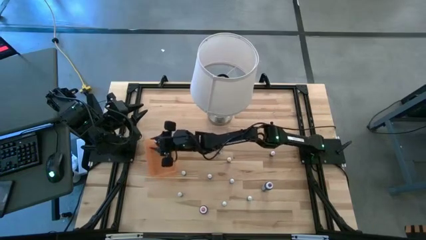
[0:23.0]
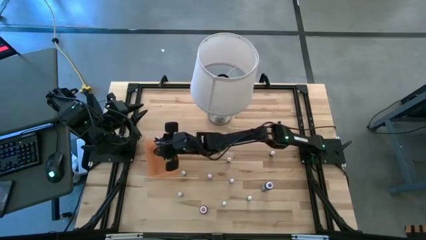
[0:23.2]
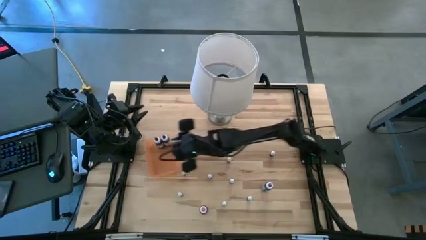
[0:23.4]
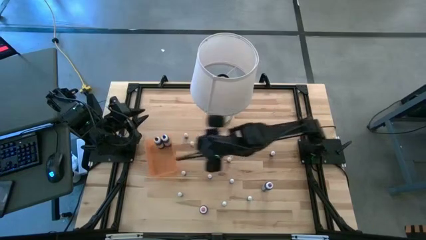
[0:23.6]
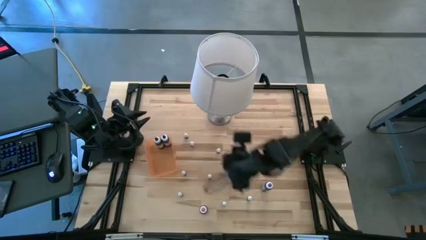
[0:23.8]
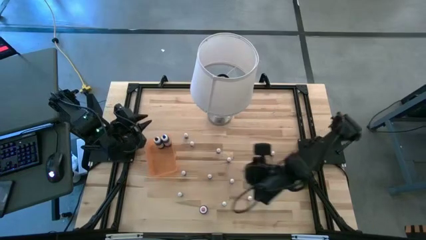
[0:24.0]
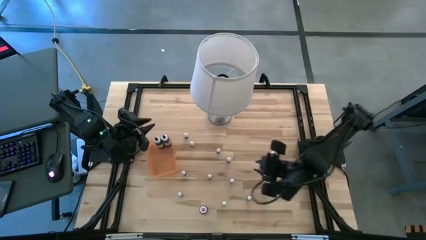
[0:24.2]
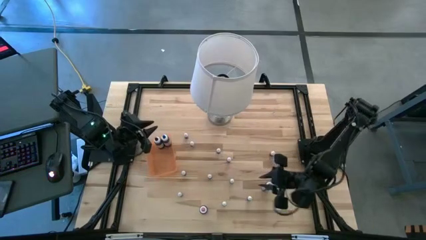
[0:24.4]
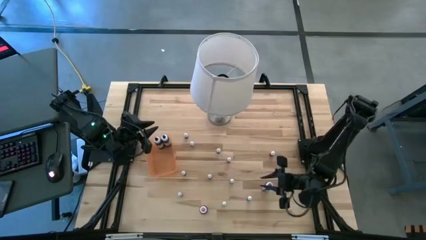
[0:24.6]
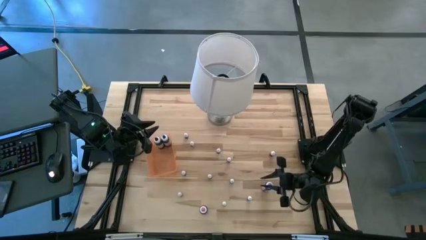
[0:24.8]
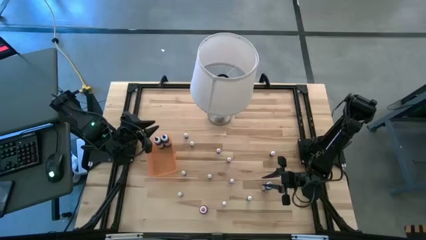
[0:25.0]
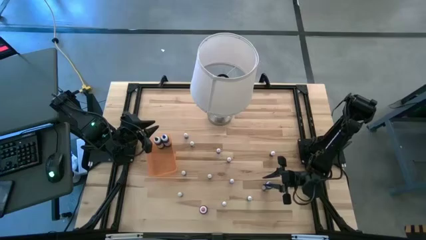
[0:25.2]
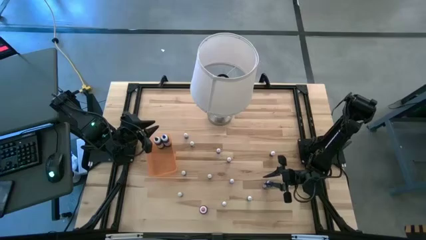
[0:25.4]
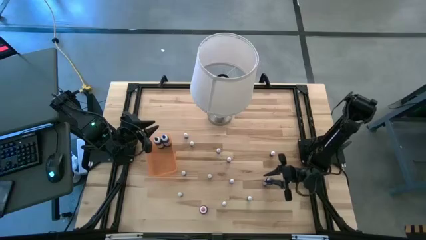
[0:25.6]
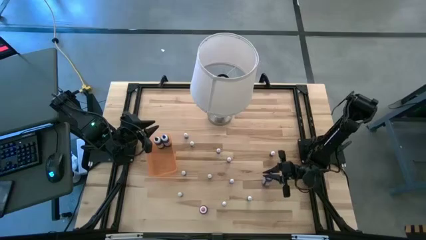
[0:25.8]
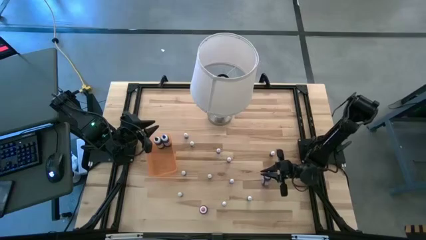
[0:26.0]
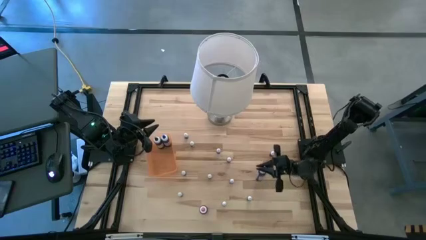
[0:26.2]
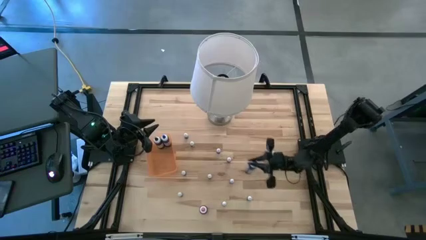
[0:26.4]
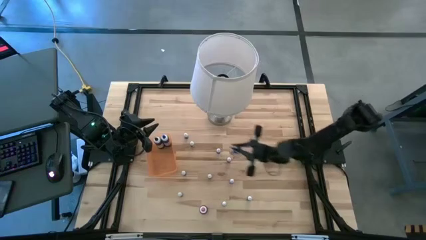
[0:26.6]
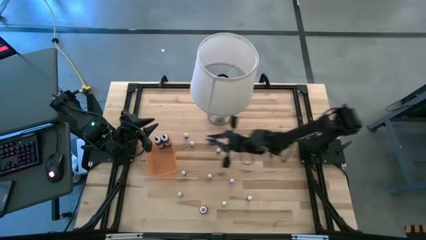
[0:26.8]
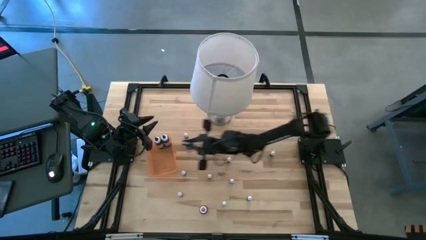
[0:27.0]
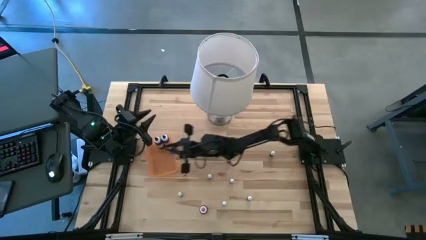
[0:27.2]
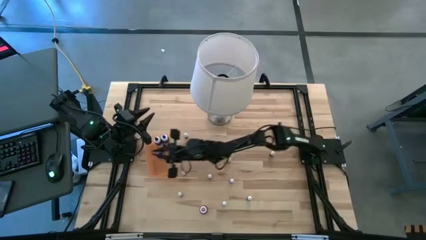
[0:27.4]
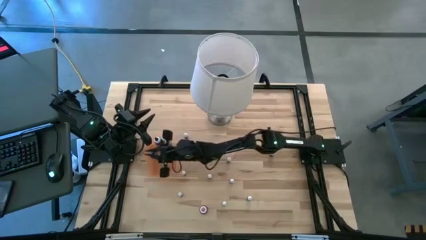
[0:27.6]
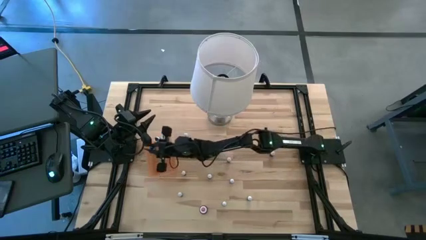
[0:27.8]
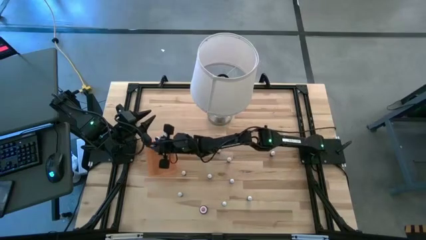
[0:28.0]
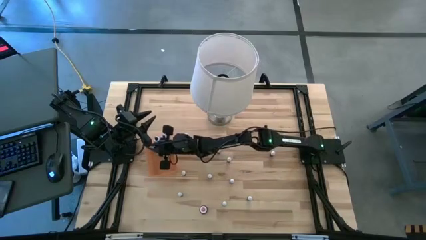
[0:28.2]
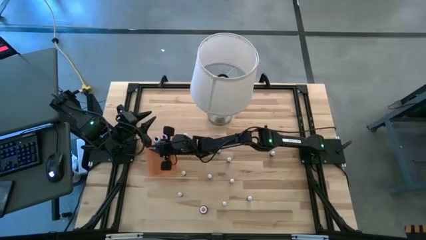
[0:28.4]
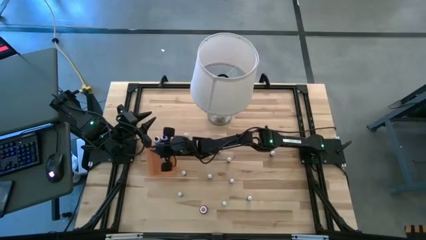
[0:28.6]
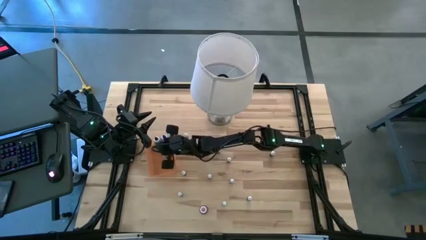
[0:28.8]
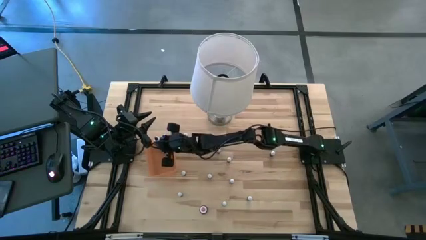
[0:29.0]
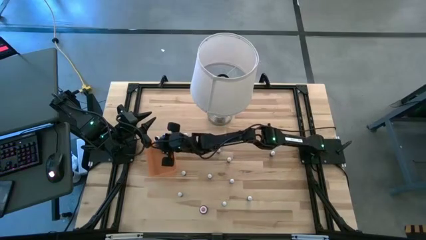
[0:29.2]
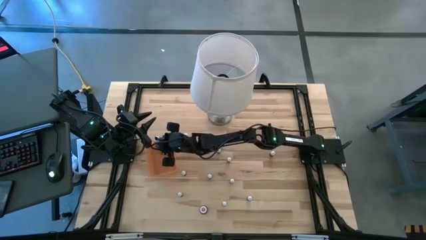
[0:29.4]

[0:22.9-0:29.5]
Task: Pick & Place food coloring
Put the big purple food coloring bottle into the orange bin

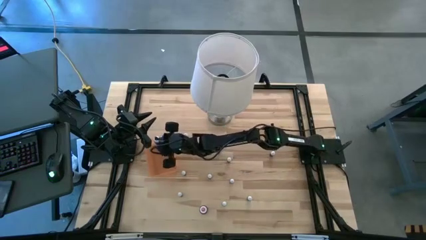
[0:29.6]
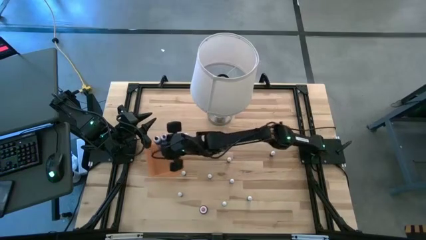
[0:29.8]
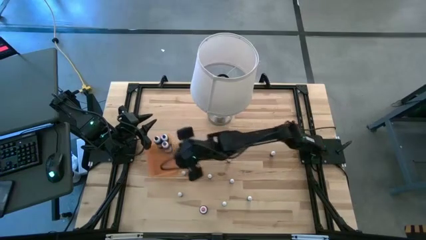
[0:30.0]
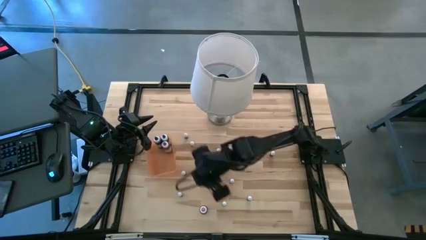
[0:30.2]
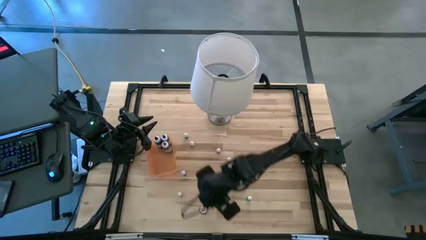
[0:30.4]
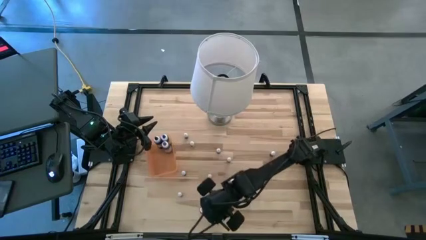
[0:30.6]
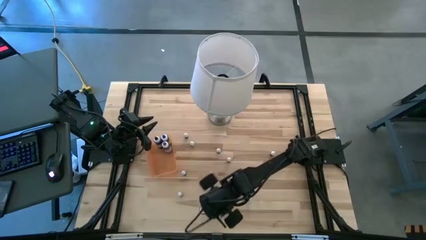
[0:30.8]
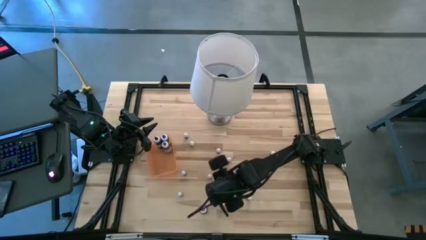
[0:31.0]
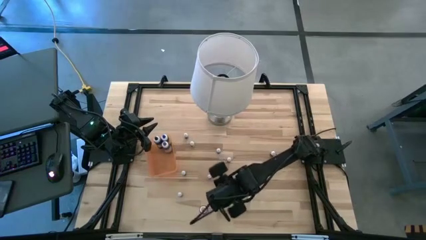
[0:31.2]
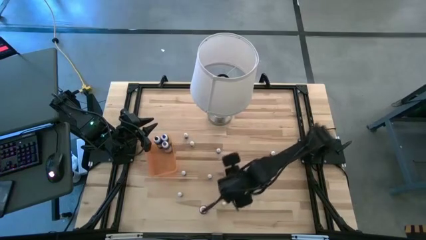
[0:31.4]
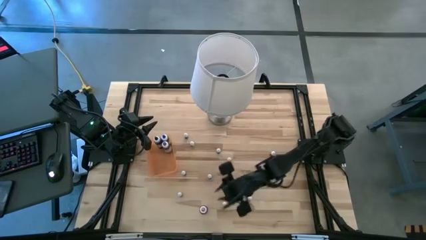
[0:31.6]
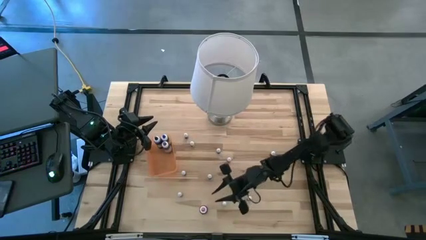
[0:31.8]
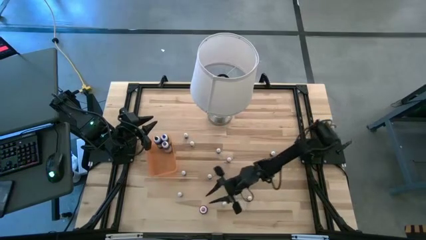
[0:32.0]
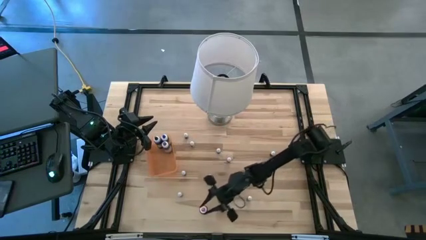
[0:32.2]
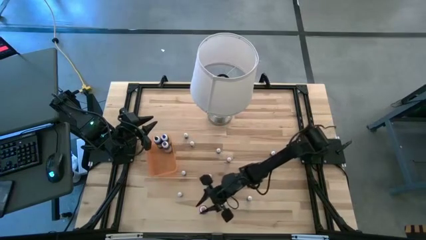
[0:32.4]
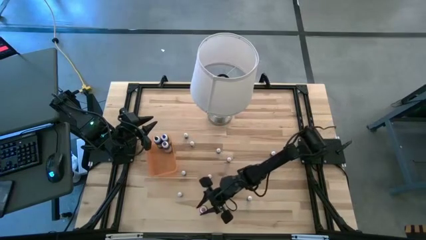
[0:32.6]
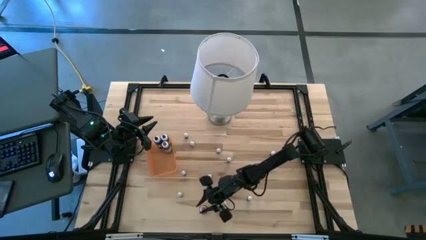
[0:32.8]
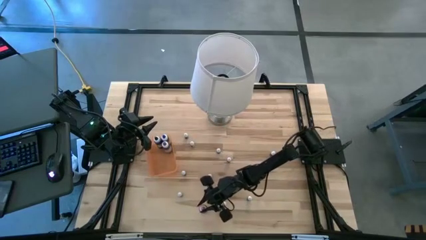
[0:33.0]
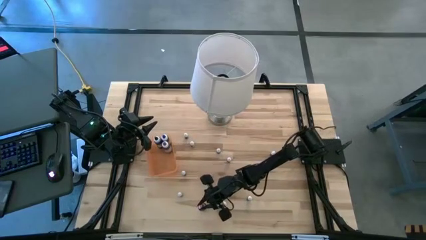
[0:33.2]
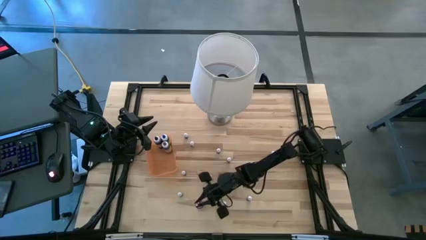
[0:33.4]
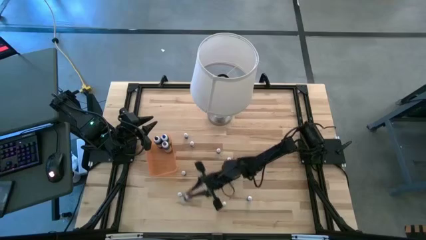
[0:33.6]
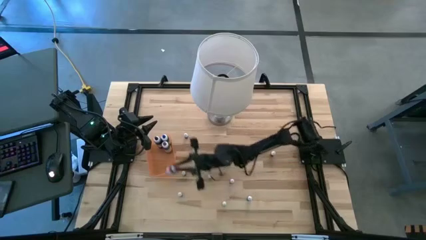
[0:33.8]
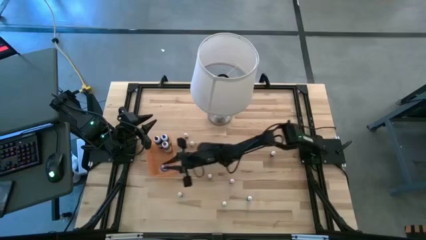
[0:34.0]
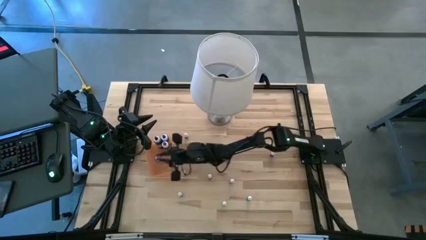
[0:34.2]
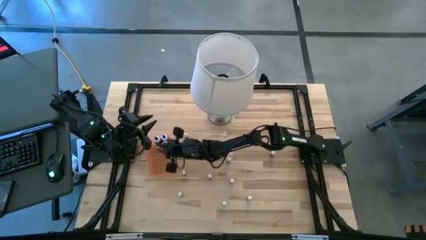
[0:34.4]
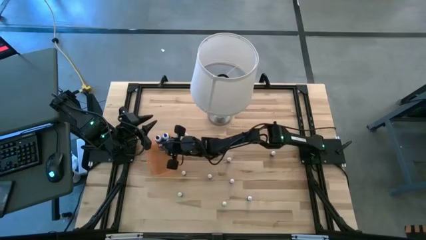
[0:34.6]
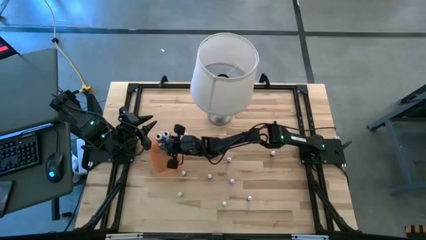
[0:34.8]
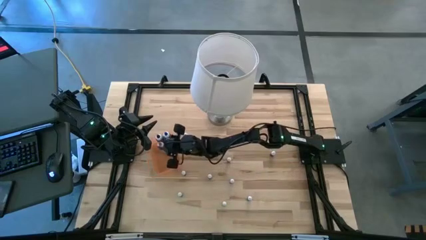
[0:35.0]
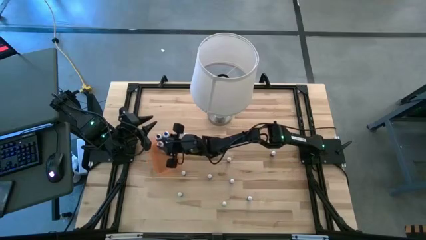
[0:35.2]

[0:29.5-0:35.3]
Put the big pink food coloring bottle into the orange bin

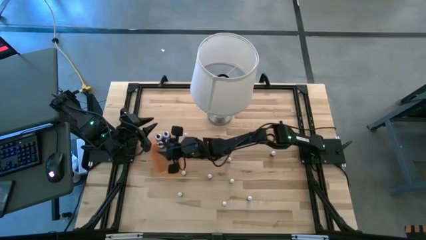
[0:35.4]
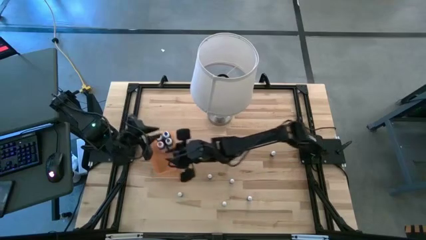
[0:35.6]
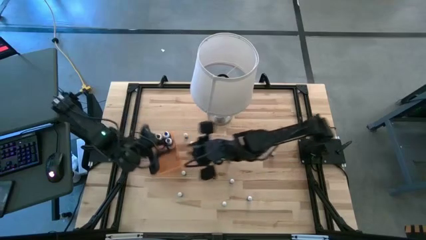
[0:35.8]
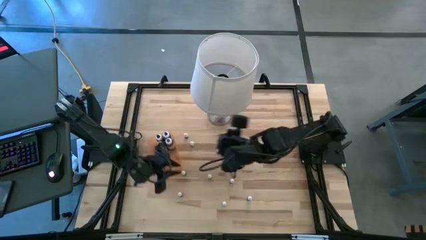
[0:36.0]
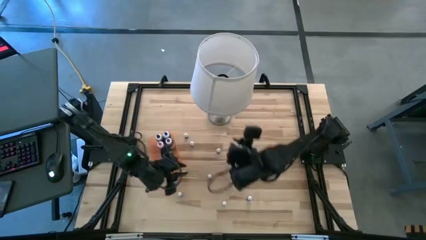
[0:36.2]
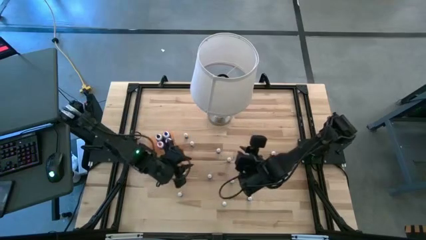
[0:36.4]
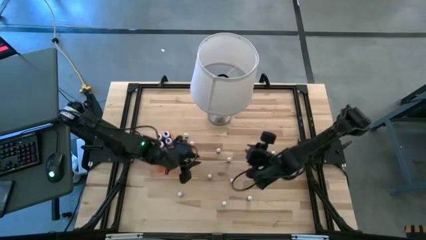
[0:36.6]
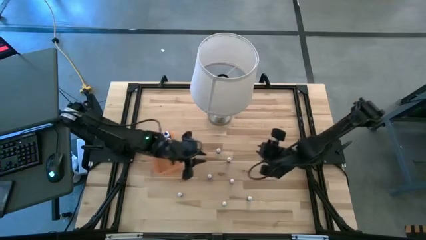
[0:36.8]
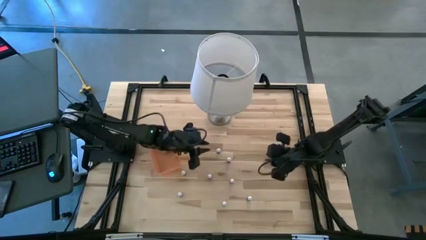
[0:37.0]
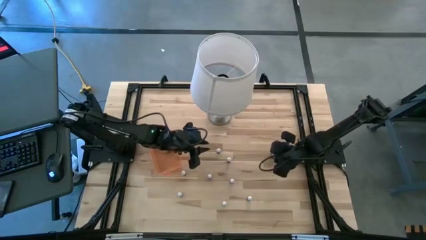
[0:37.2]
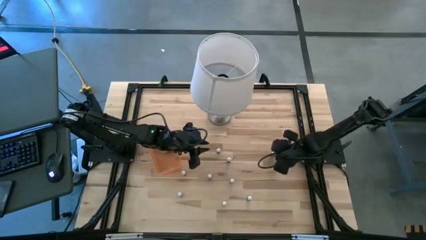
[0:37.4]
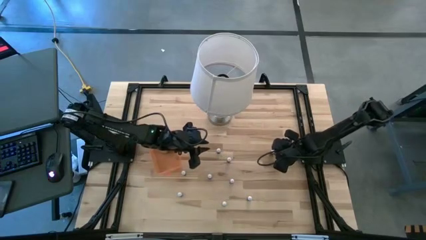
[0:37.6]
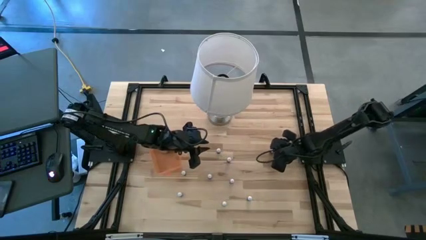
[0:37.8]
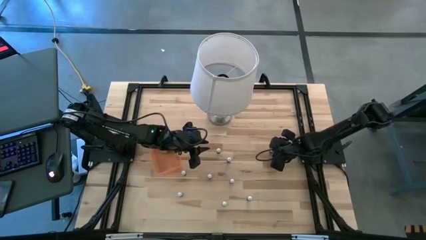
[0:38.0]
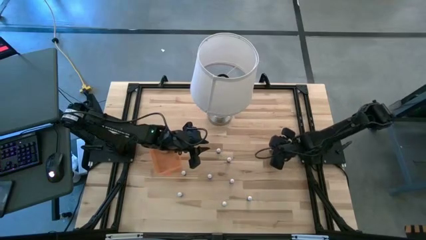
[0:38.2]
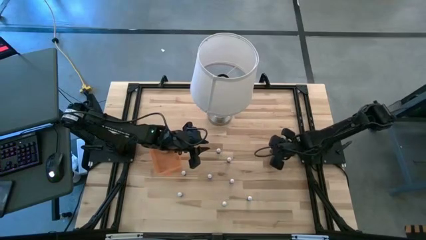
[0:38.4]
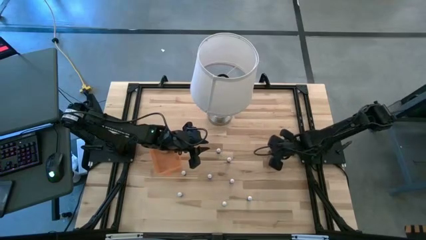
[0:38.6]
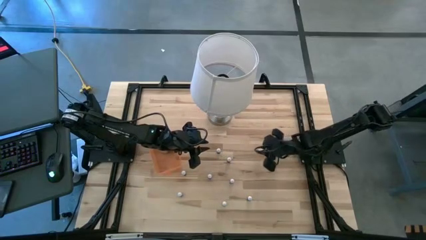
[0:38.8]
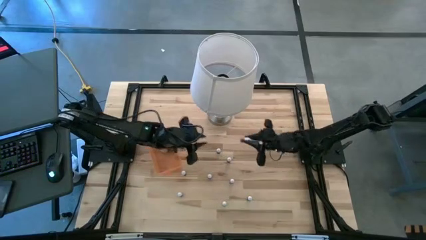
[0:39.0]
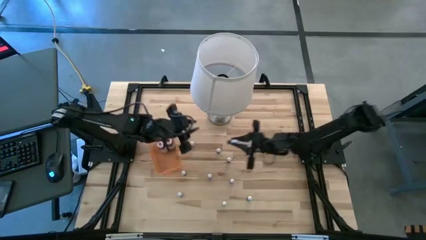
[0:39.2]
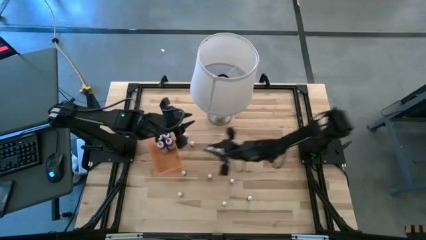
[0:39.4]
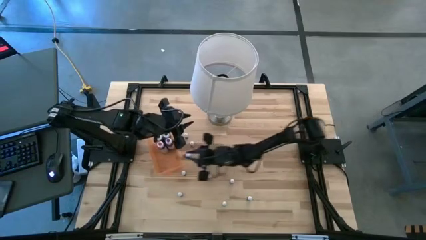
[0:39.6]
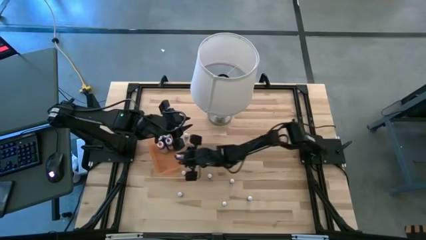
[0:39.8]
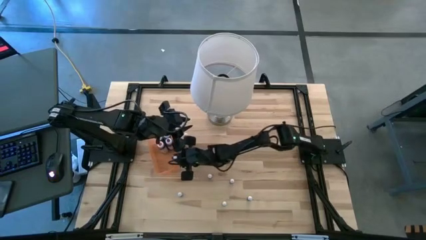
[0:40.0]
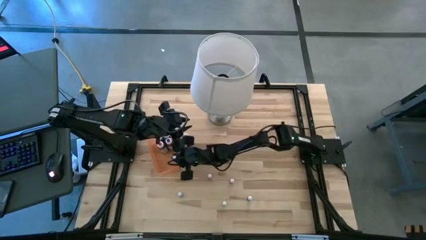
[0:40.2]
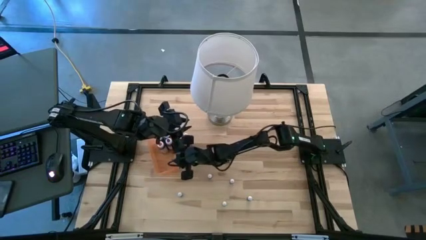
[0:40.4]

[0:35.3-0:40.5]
Put the orange food coloring bottle into the orange bin
